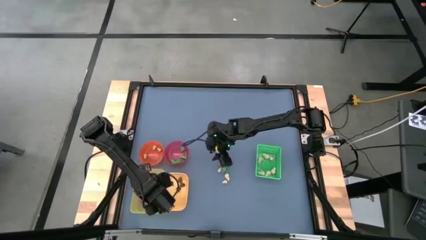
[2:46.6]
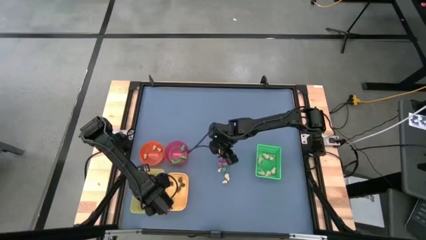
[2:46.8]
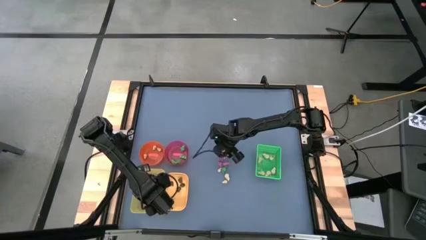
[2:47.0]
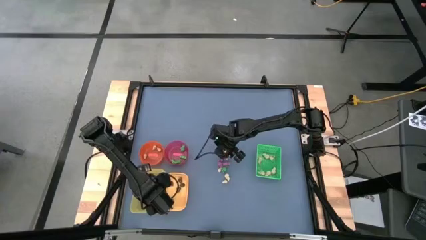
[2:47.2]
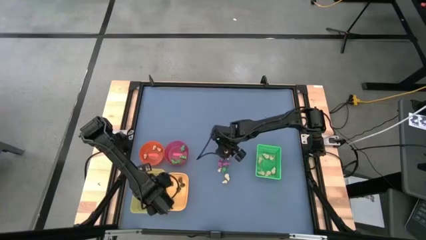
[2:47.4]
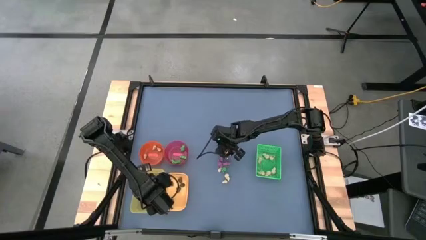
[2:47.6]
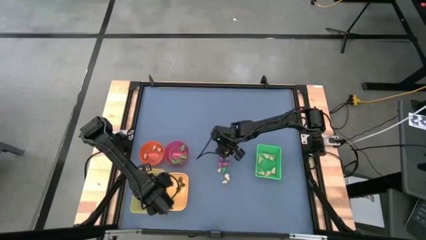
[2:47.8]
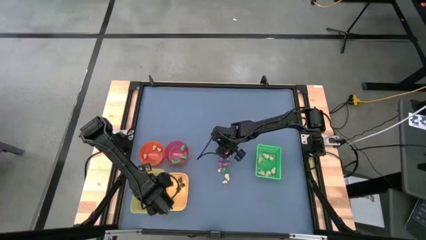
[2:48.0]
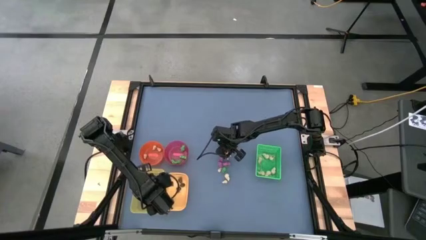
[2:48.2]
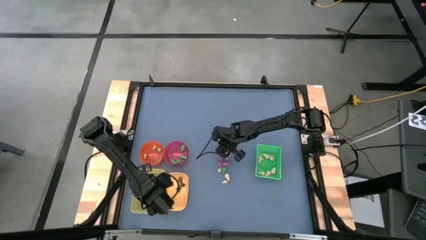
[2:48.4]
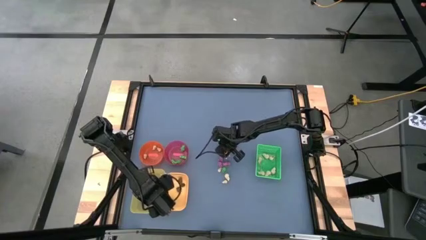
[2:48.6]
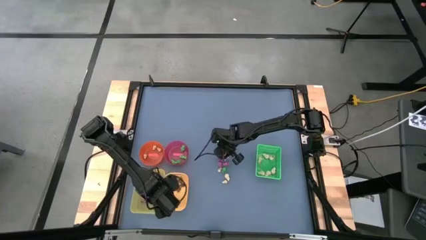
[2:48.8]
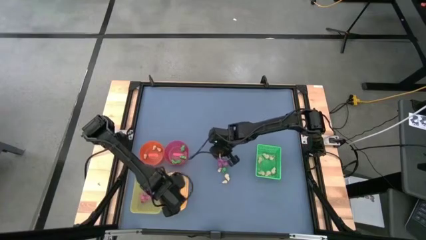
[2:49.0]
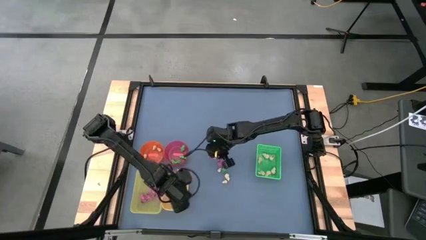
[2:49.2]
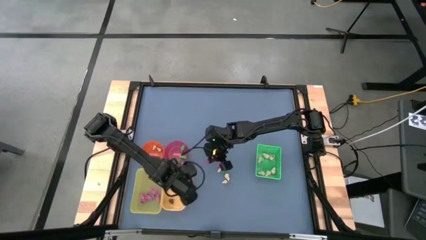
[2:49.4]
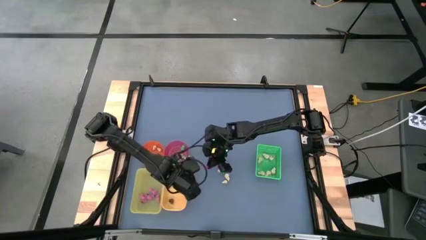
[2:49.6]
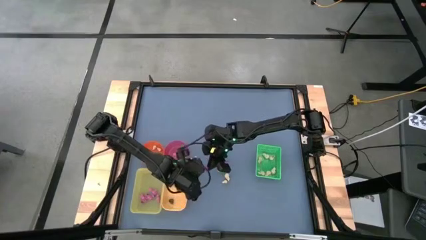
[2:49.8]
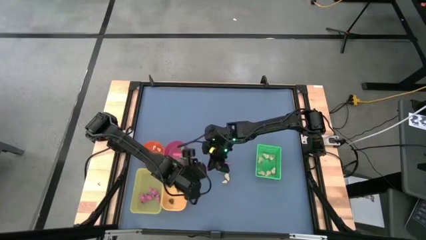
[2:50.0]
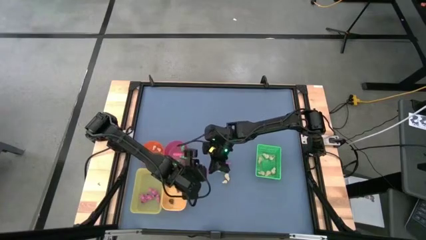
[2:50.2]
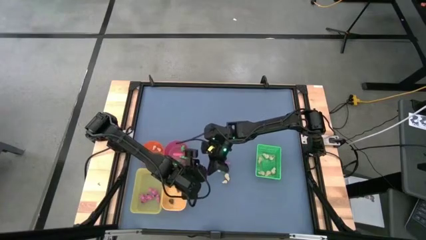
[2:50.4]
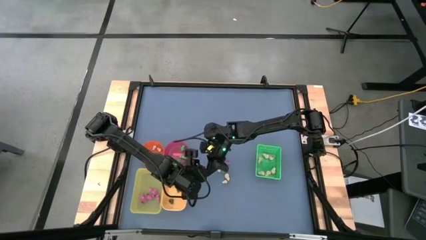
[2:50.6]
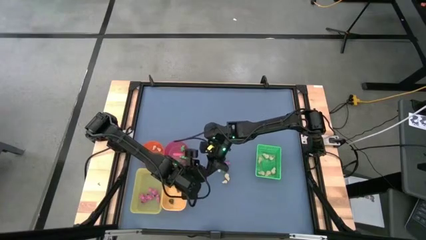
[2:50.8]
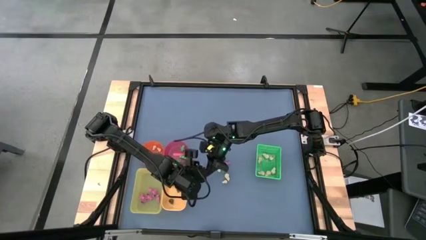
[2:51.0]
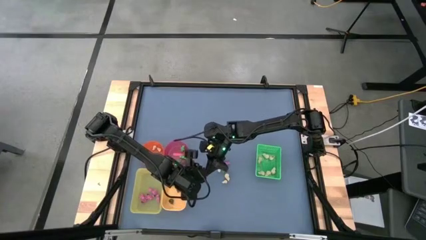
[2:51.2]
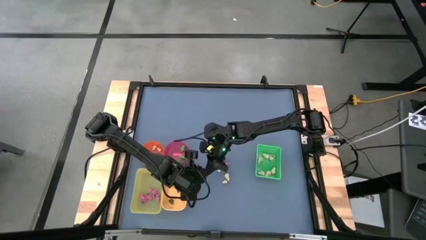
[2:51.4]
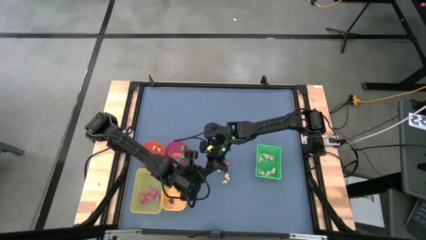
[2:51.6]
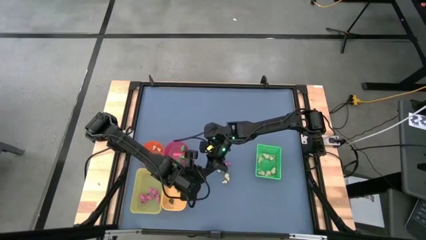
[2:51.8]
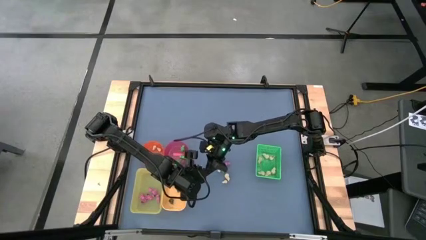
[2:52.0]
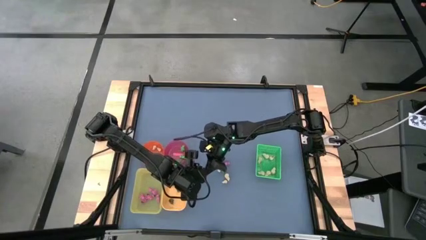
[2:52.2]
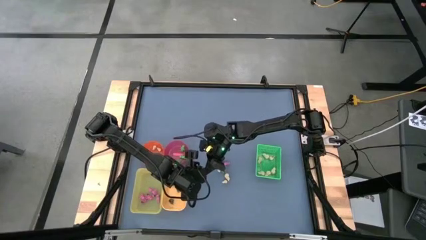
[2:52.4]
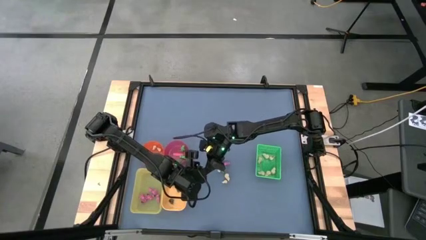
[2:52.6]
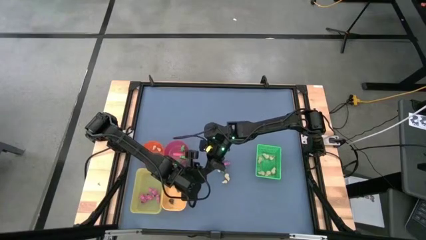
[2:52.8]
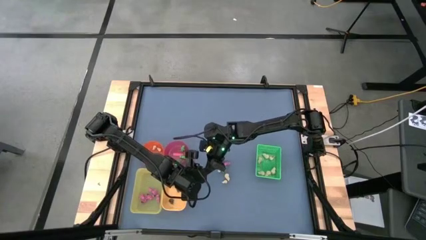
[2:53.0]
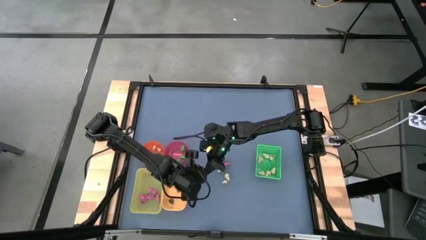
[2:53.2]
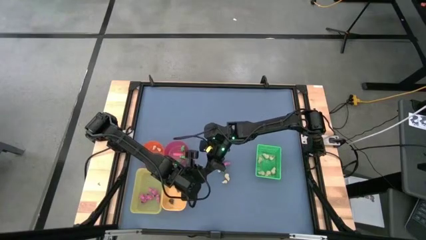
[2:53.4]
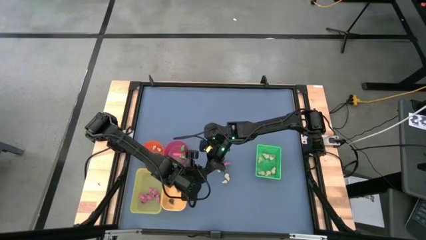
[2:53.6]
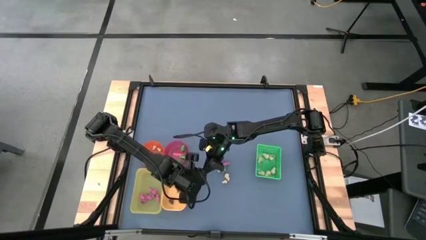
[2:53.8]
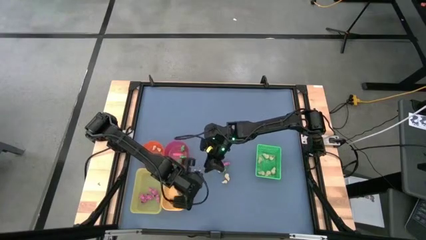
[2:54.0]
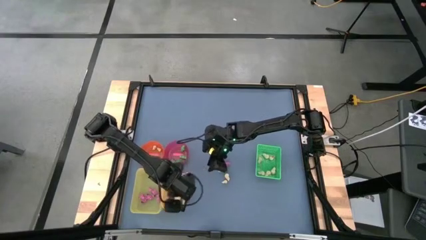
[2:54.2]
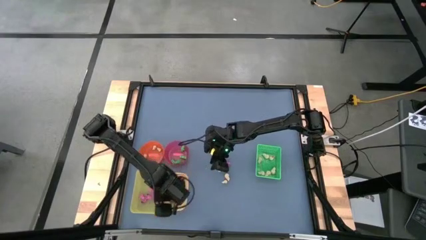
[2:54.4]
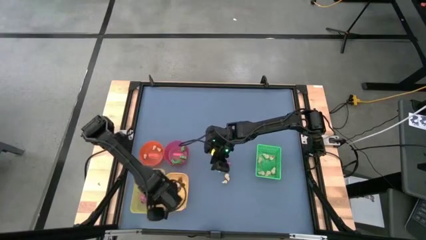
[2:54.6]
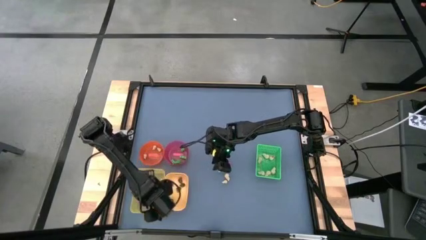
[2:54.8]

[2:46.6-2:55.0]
Task: Sort Halloween decoration
Put the pink skeleton toy into the light yellow bin

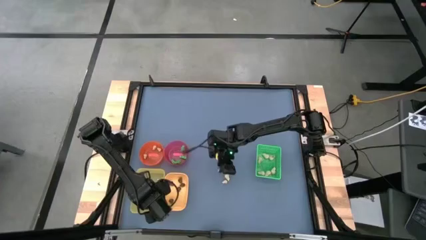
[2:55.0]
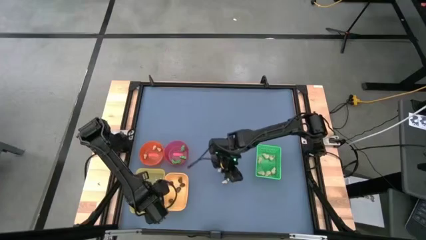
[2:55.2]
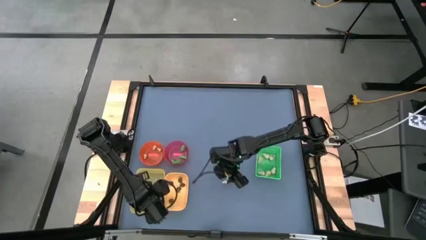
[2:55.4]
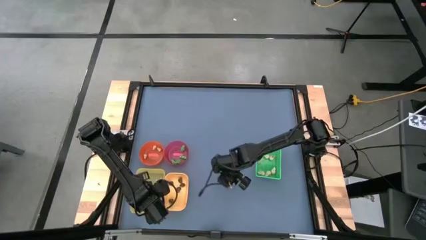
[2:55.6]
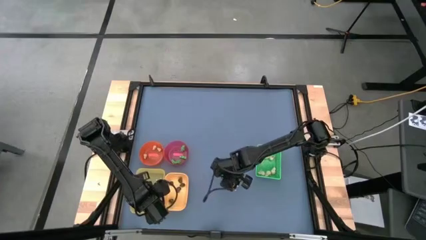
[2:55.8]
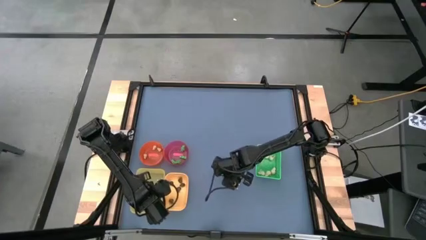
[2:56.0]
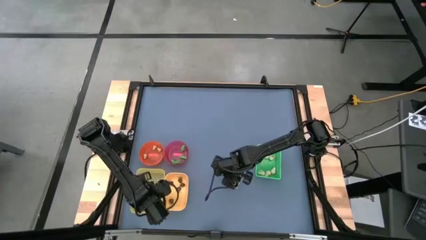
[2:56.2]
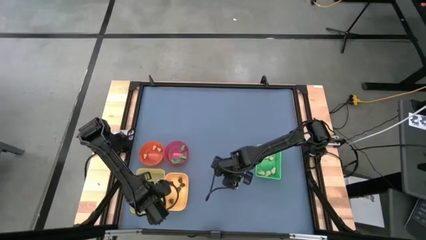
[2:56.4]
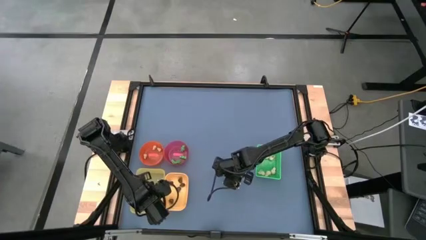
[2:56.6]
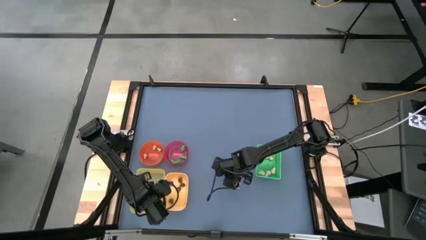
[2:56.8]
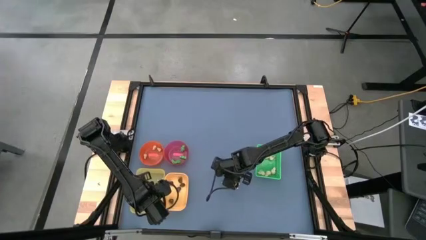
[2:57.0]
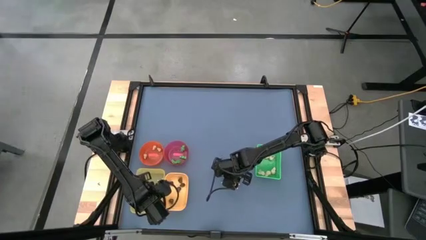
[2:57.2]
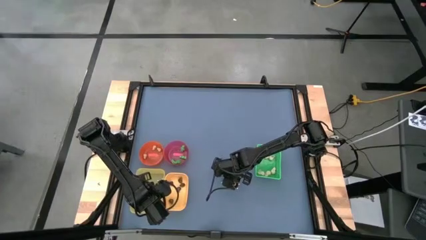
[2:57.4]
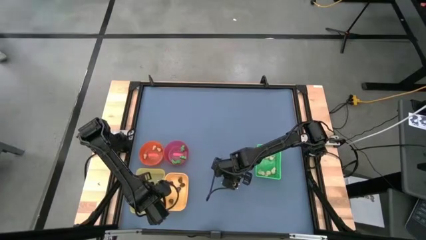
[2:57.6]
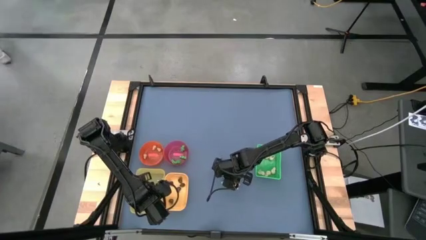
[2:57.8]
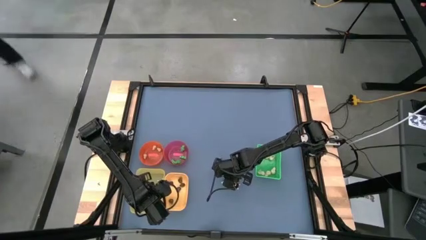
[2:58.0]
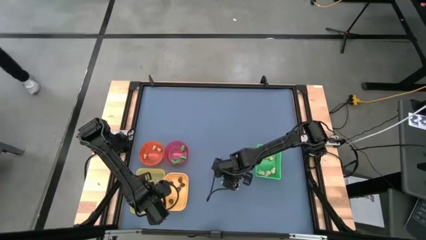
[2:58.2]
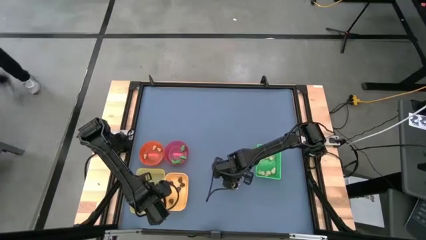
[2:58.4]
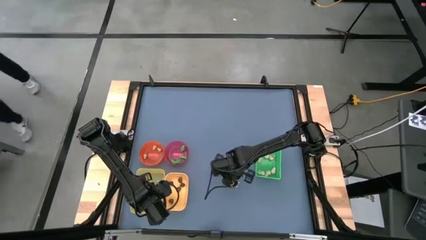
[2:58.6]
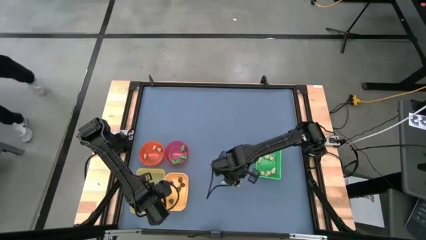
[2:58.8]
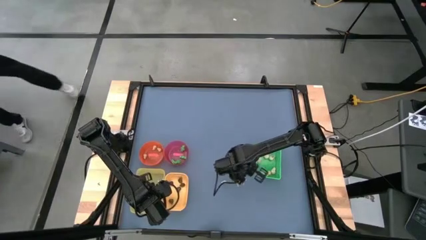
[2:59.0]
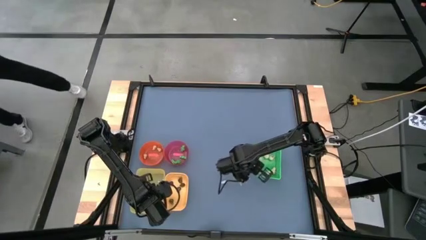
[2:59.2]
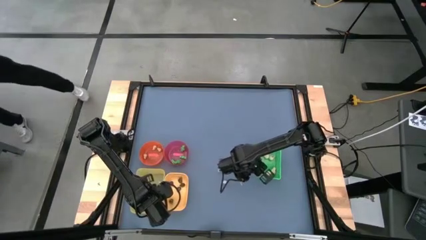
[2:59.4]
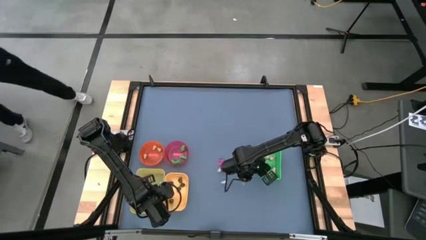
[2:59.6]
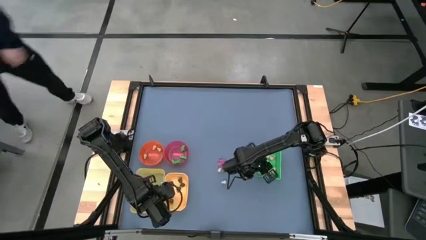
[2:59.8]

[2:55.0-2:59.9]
Put white skull toy into the green bin

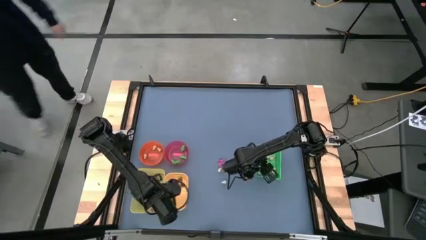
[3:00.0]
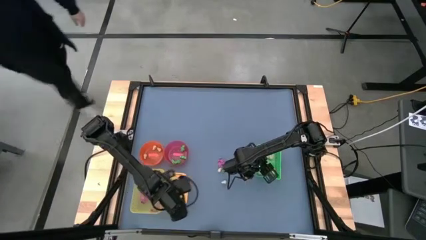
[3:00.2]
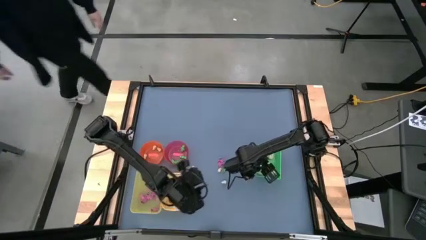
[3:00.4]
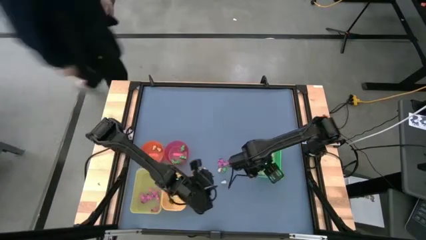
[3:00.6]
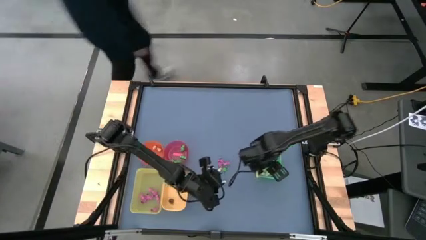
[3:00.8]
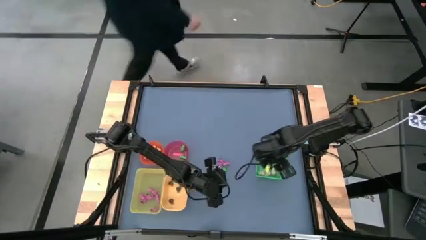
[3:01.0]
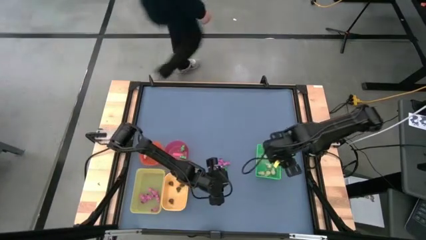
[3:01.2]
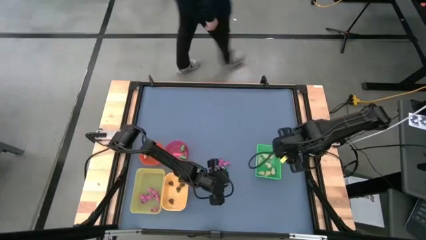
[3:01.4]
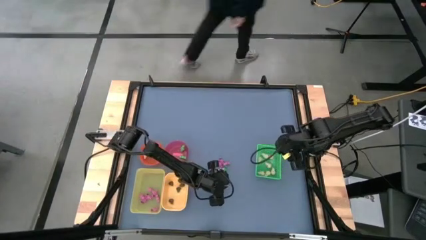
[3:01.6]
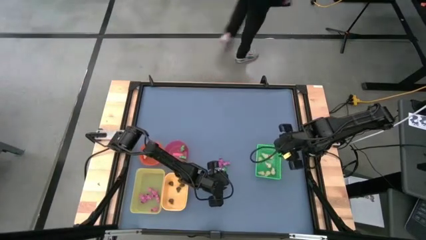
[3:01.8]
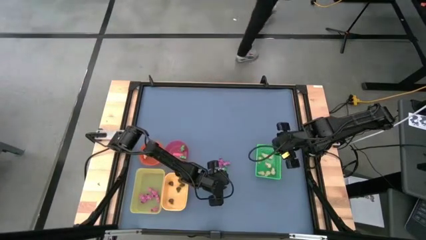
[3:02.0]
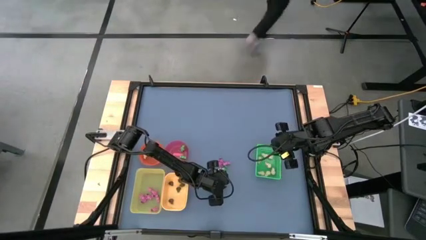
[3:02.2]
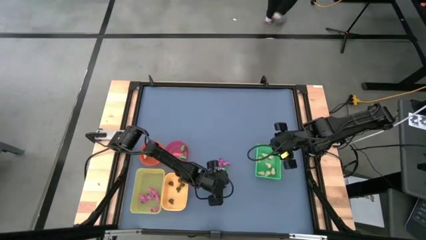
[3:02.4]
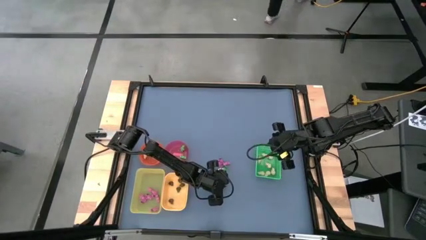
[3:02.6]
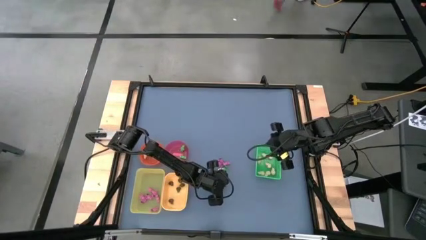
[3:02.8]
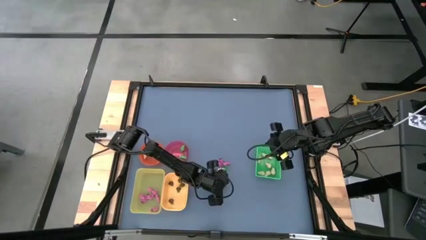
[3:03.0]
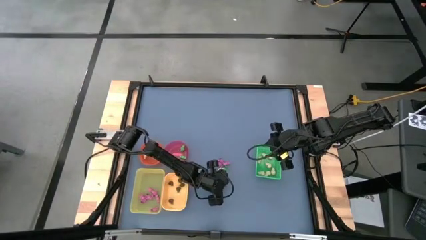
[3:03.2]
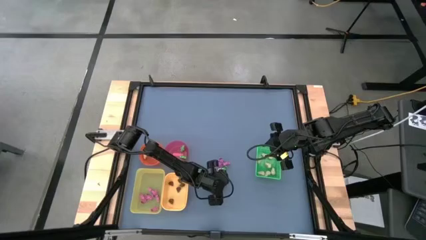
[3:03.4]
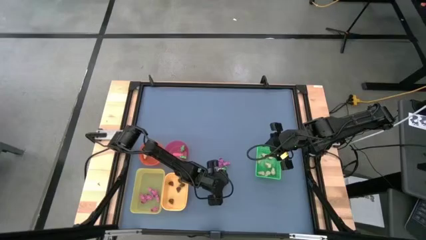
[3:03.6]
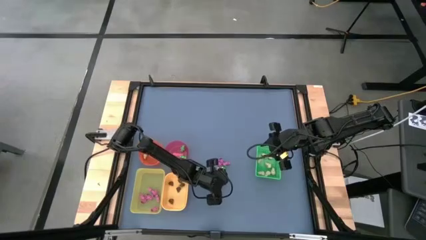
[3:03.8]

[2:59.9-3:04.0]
Put the white skull toy into the orange bowl
